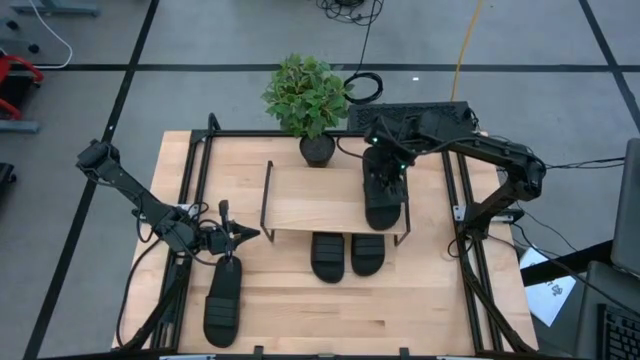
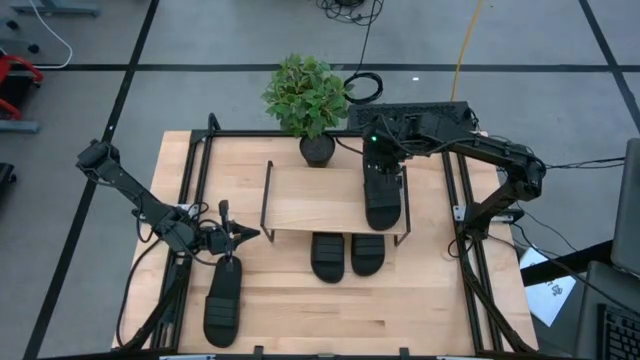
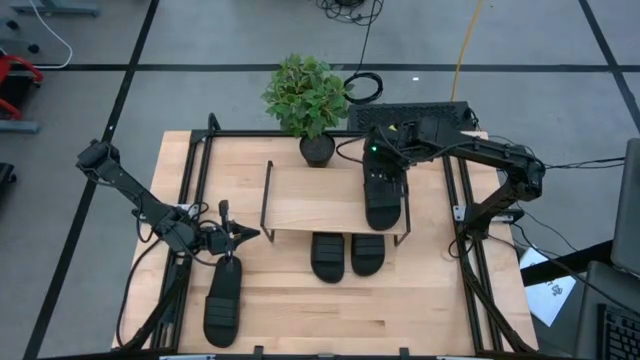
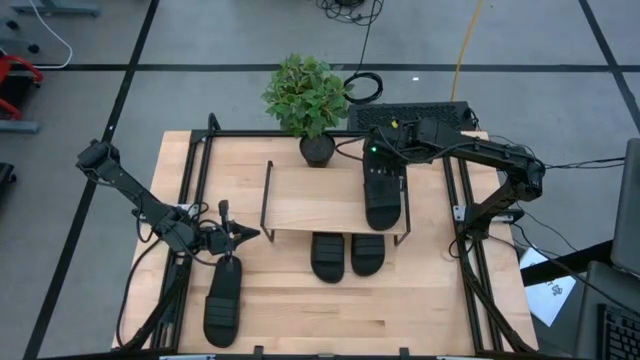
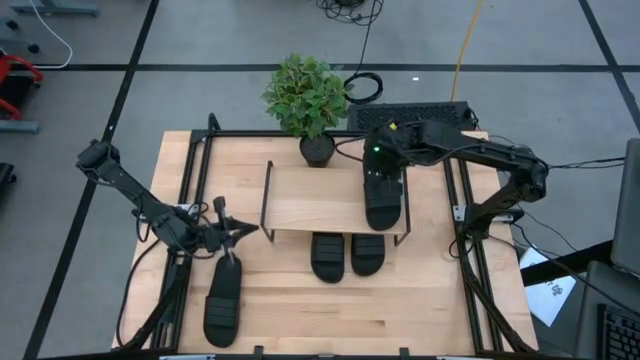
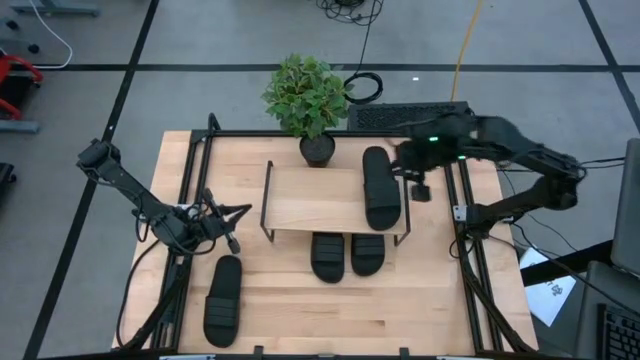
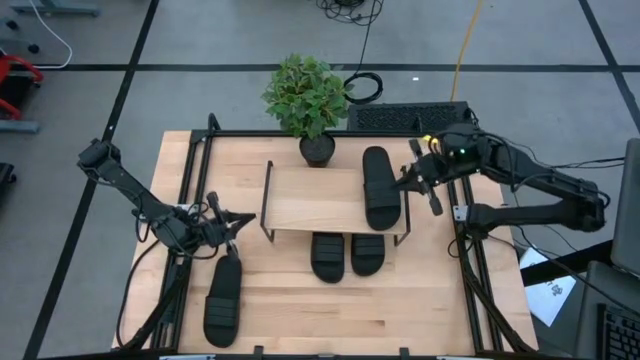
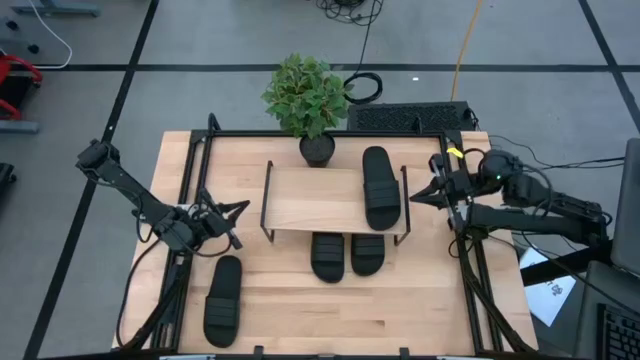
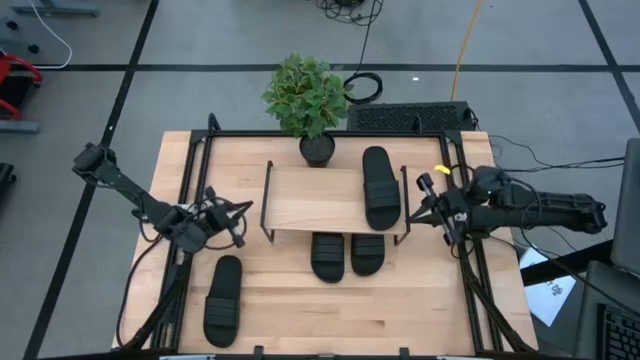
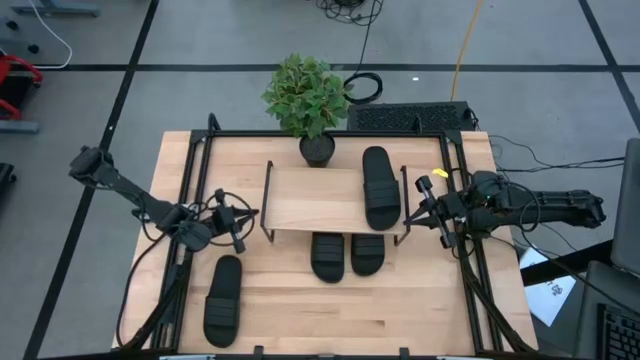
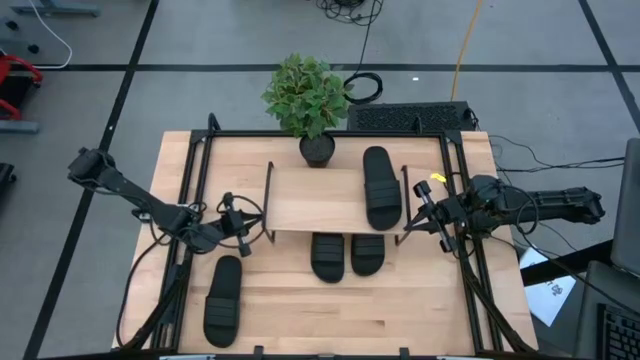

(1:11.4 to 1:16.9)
Task: Pick and place slides into the shelf
Adjust the shelf

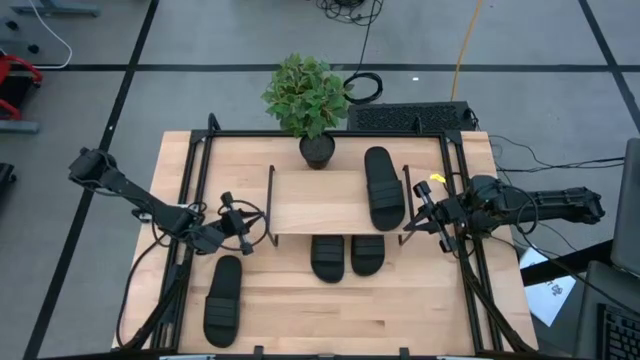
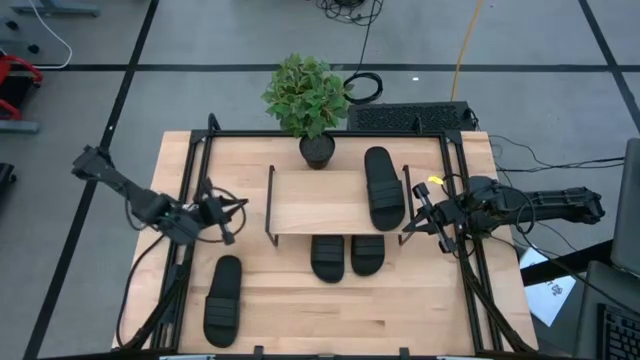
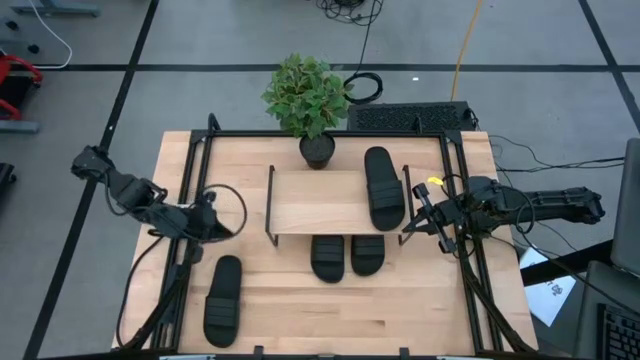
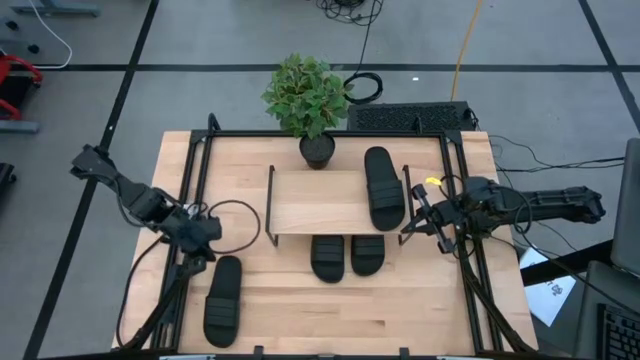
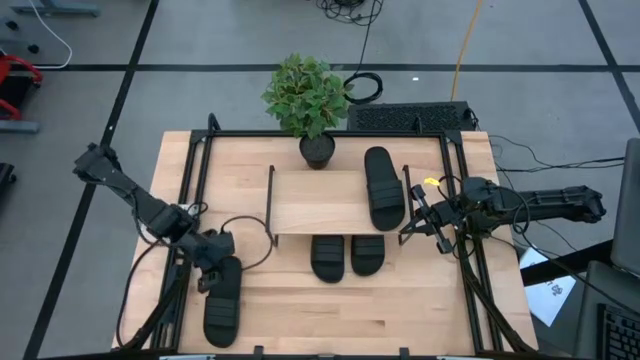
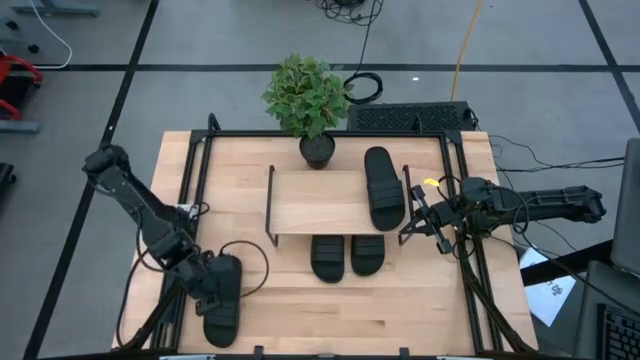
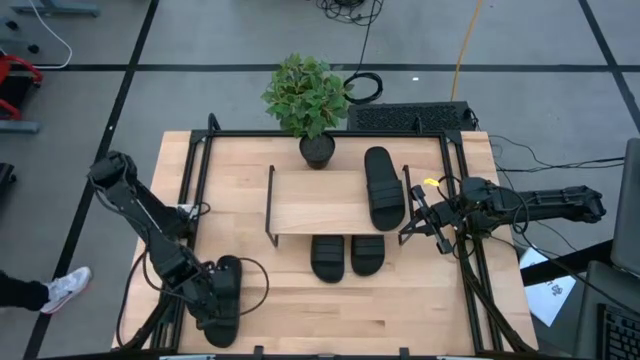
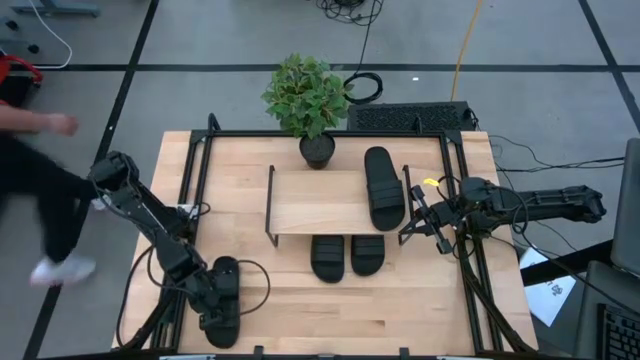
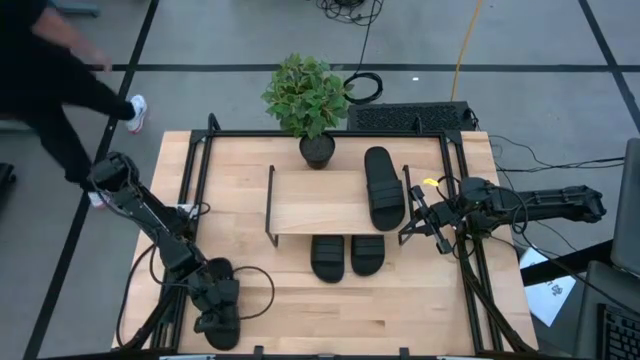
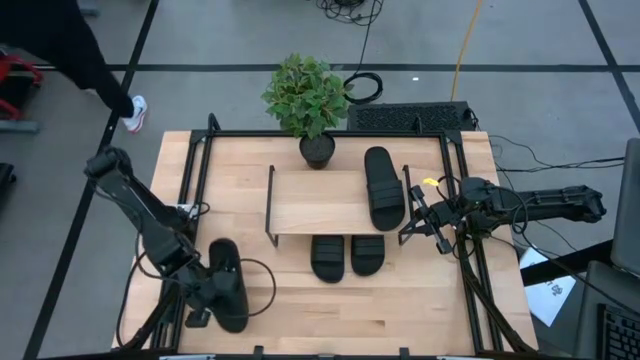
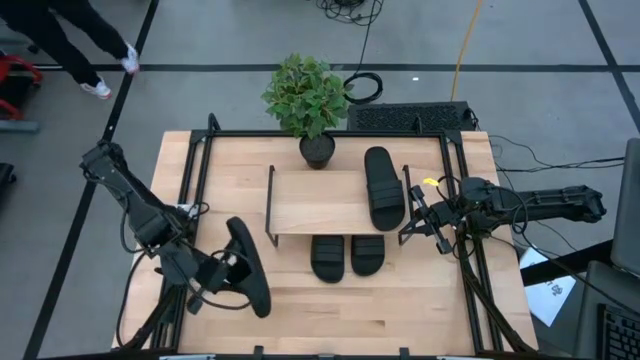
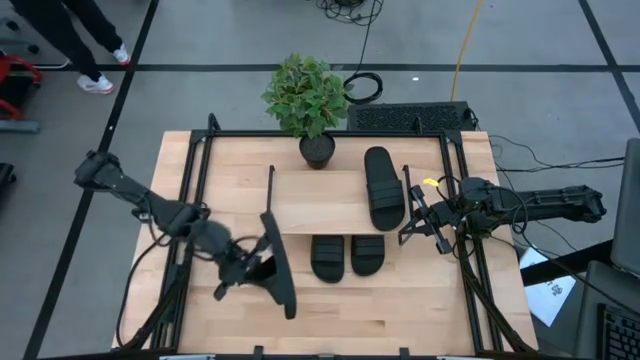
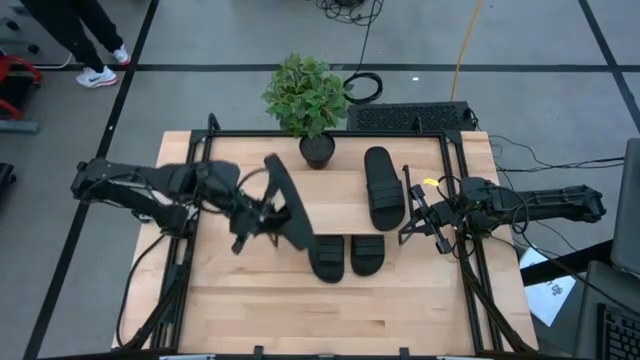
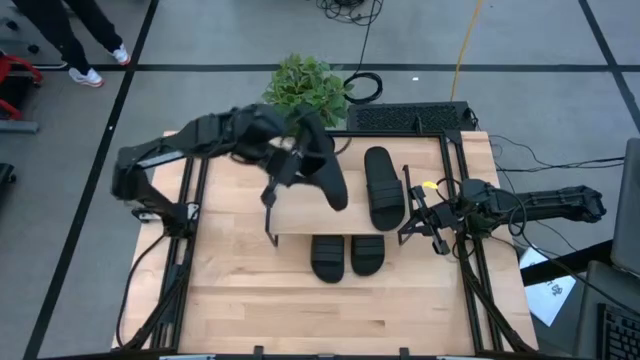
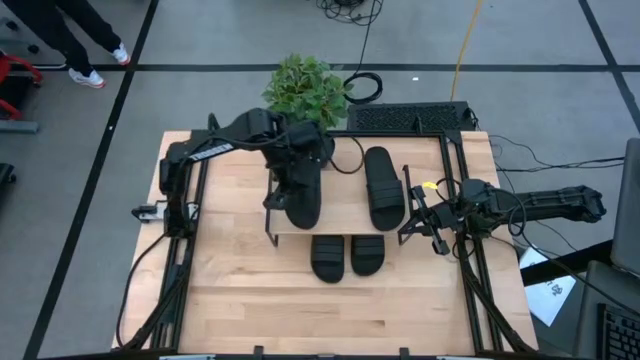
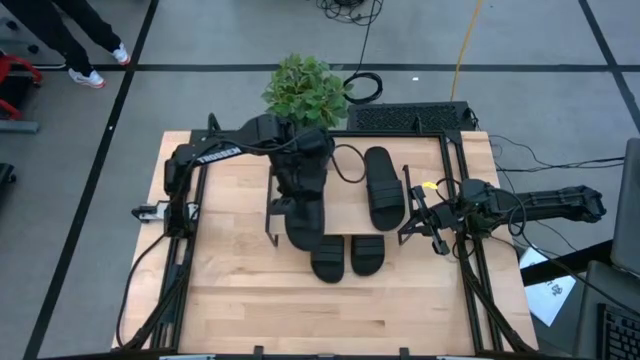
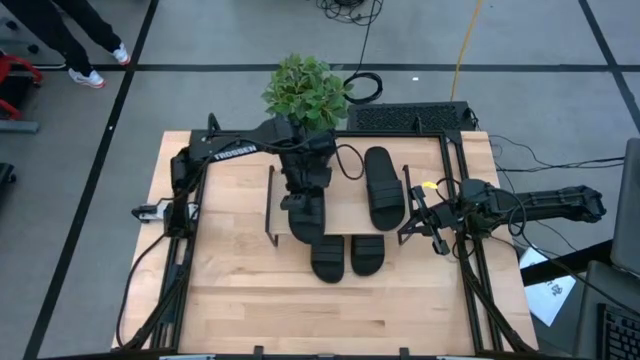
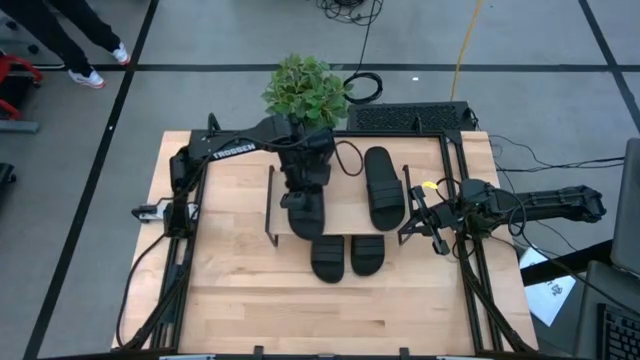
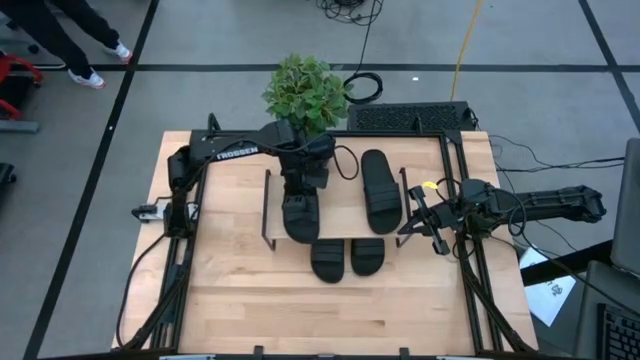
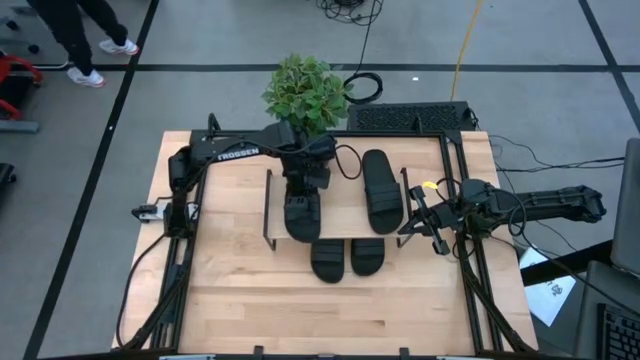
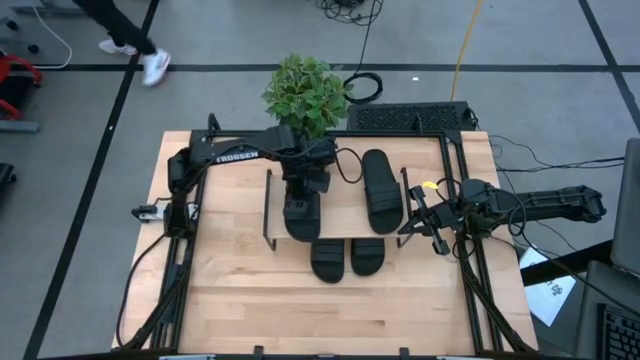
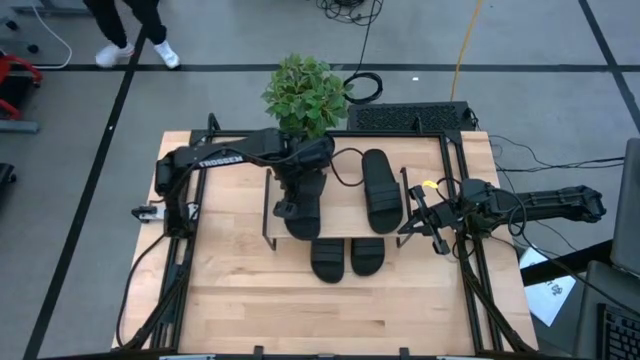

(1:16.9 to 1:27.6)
Put the black slides on the shelf

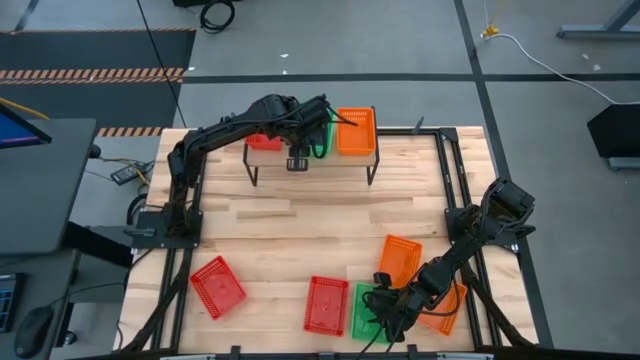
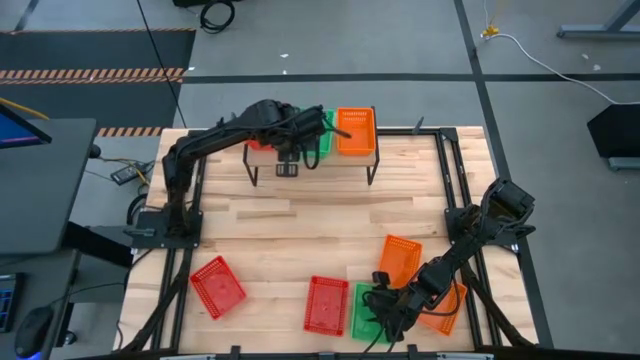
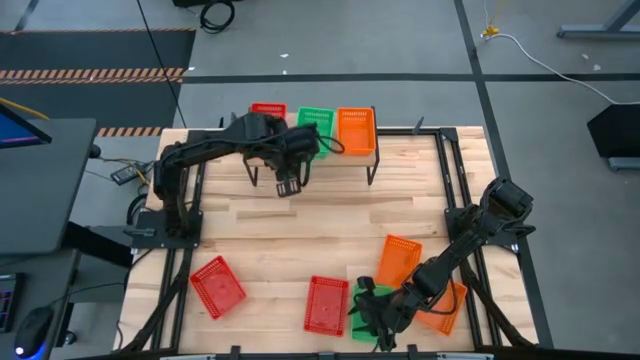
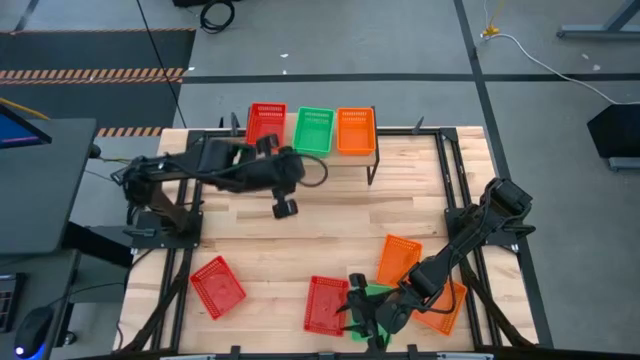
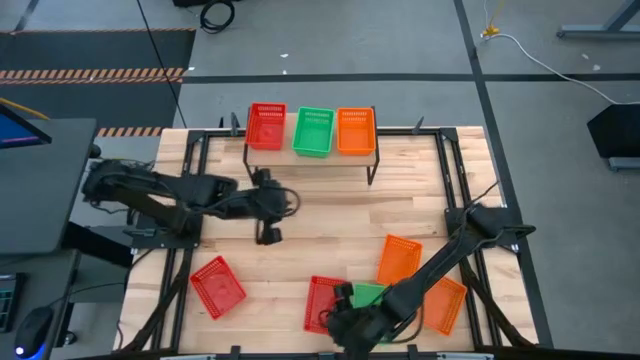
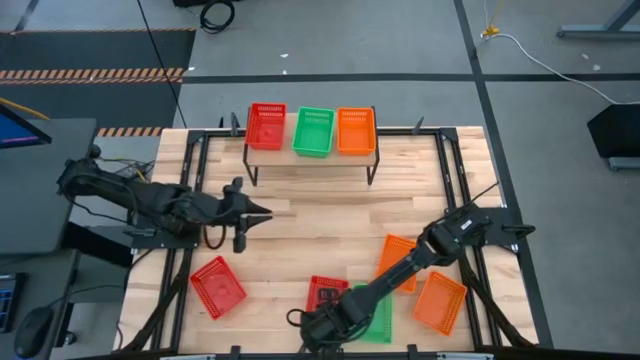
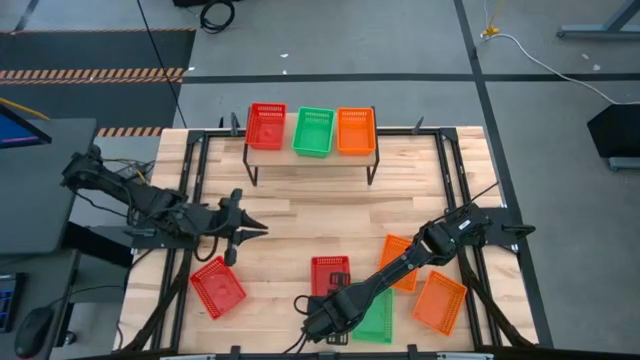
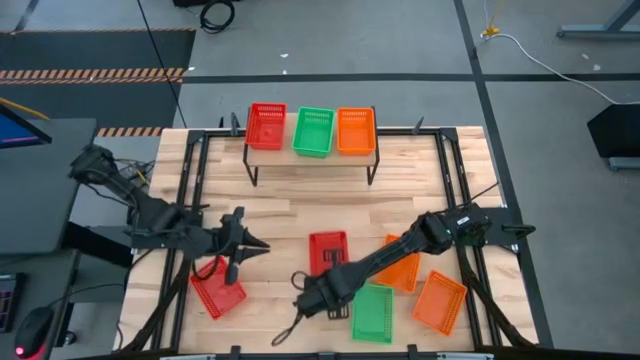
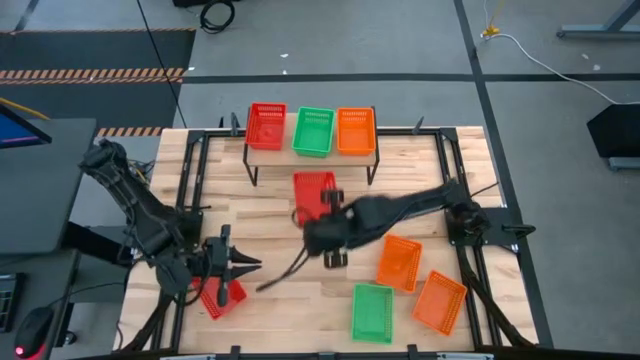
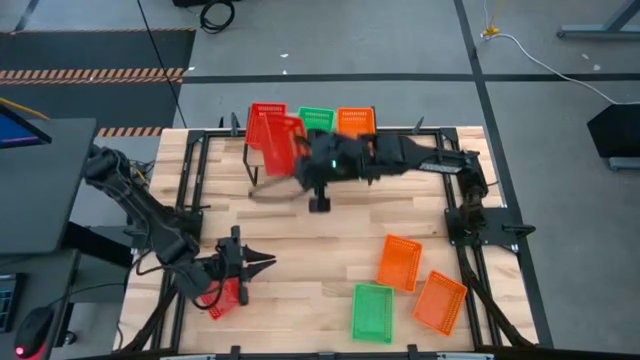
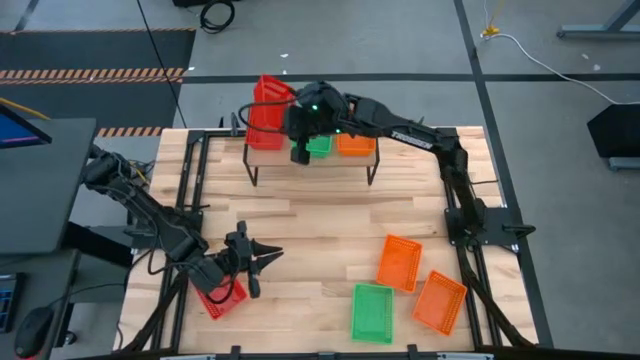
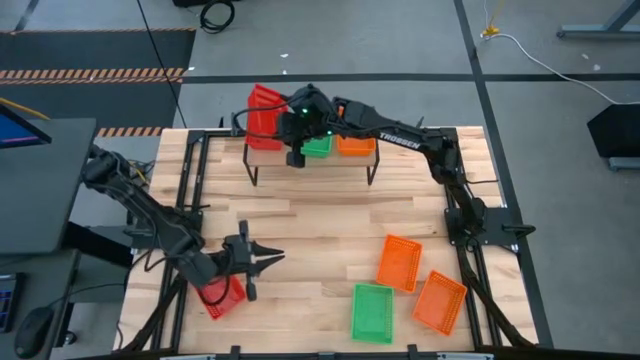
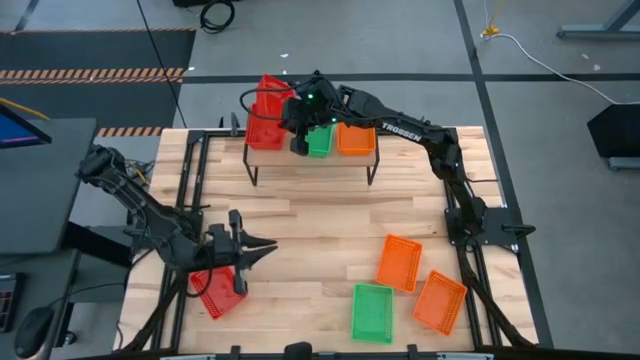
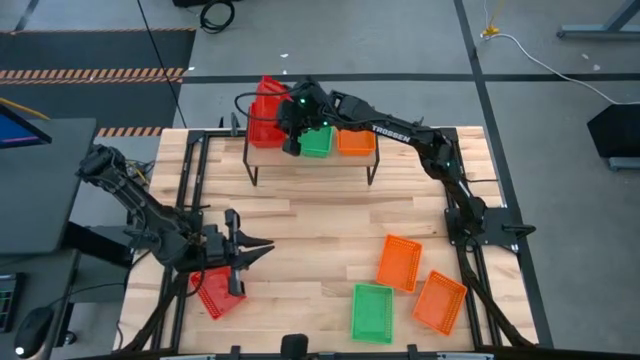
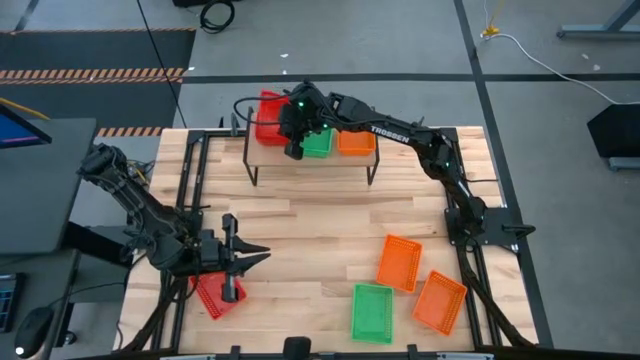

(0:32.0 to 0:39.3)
Task: Stack baskets on shelf by color
Stack the right red basket on top of the red basket on the shelf
